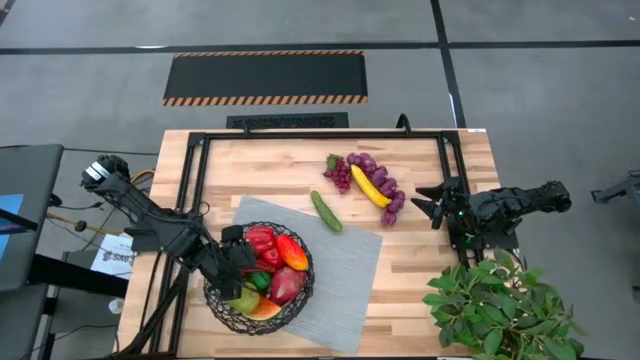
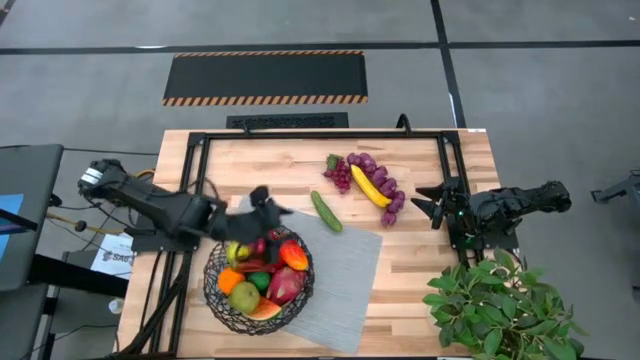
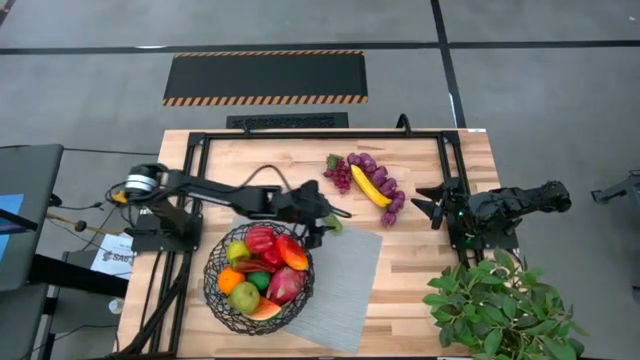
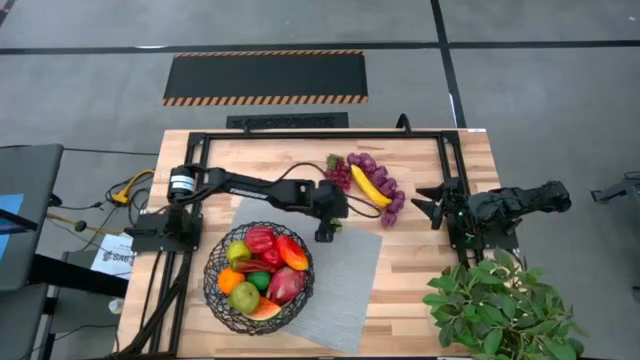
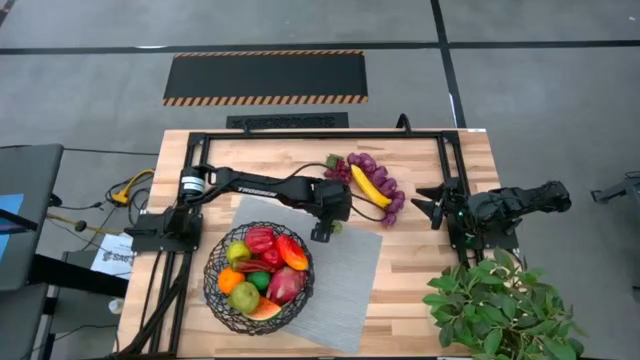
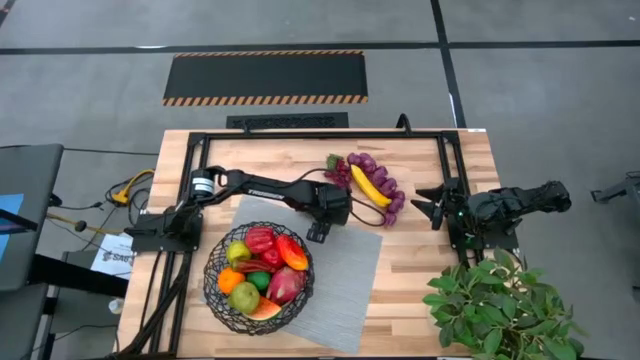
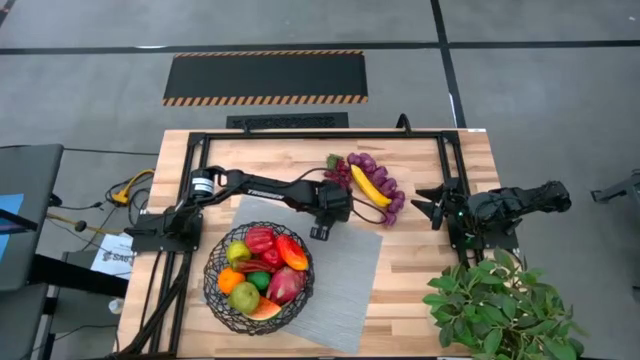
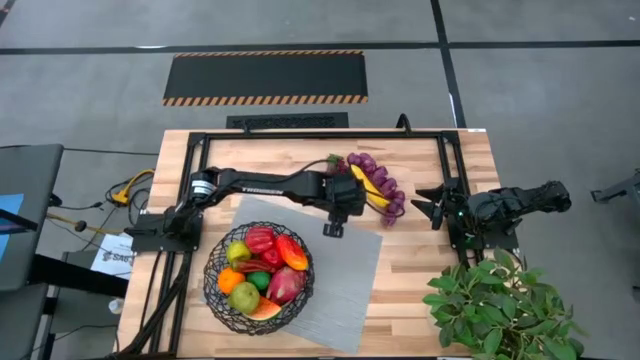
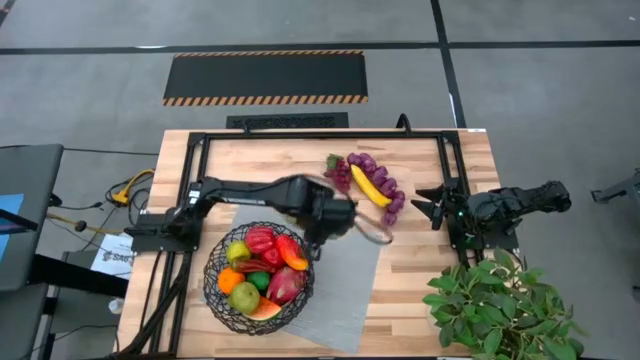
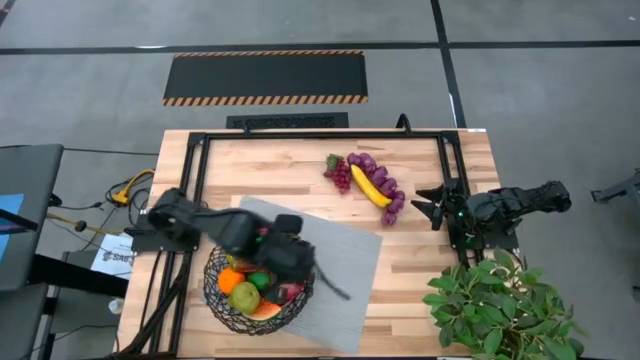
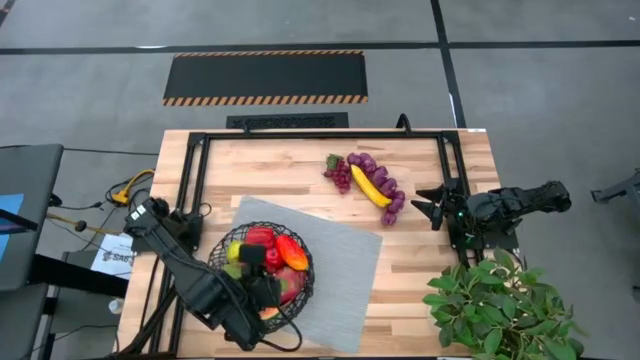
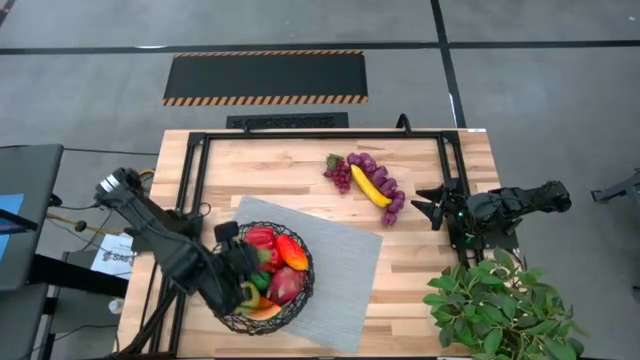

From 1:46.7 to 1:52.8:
Task: Build produce basket
Put the green cucumber into the mesh basket

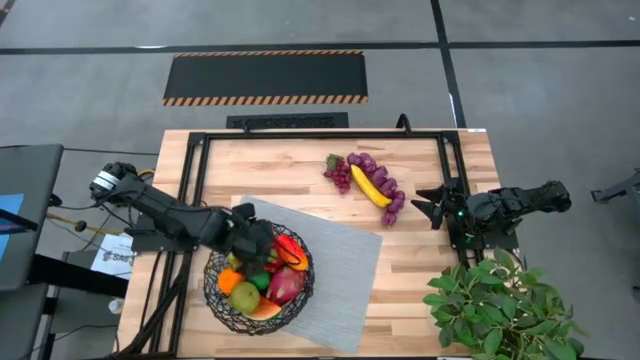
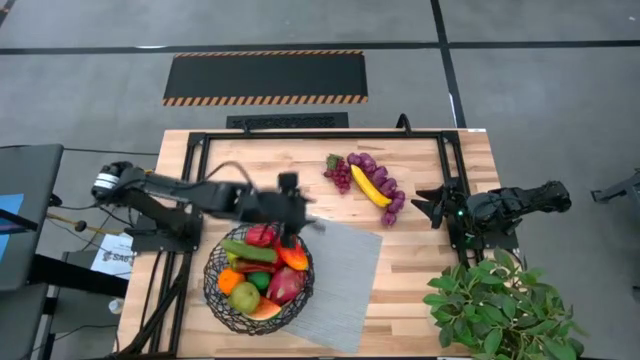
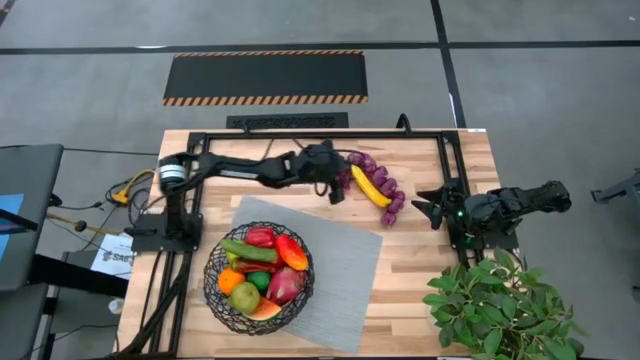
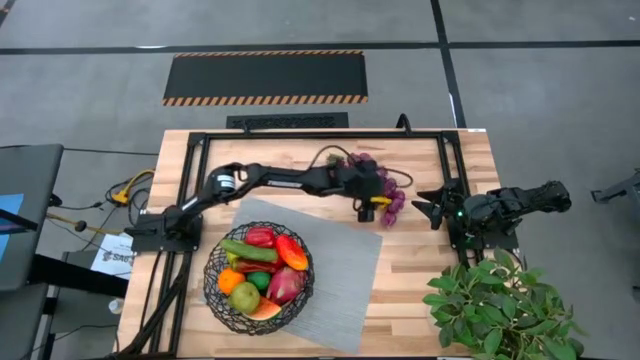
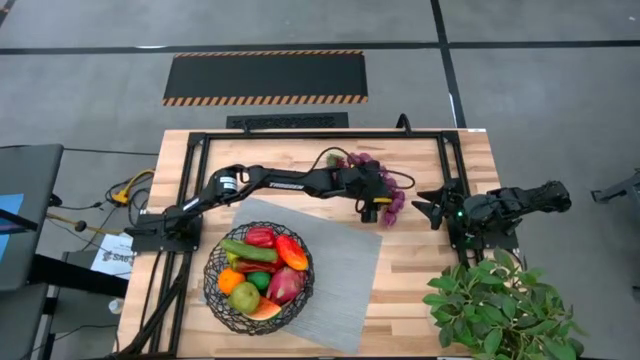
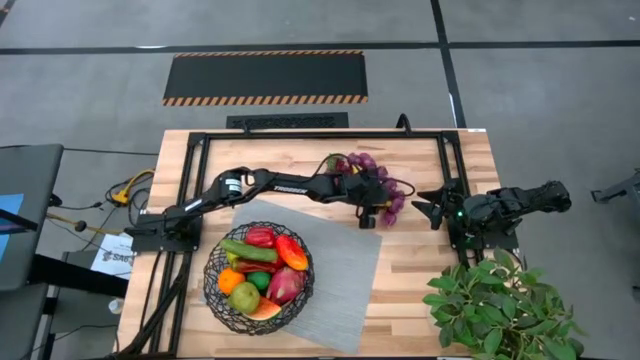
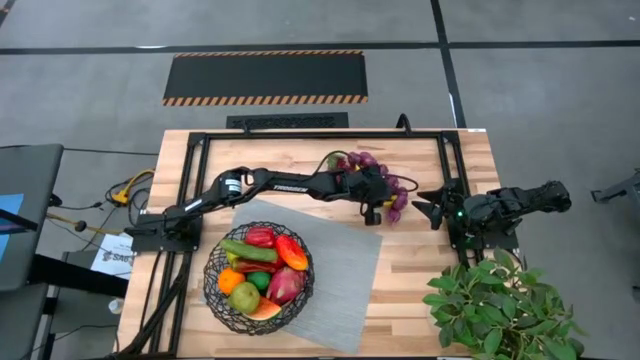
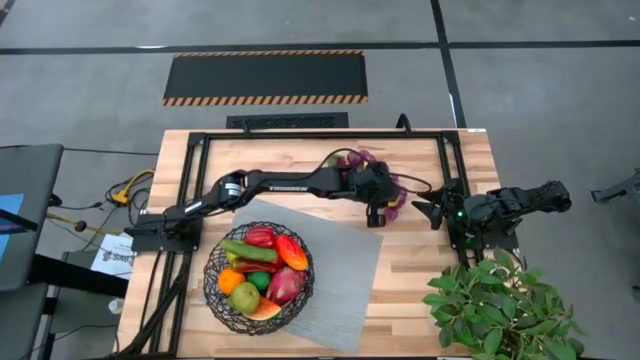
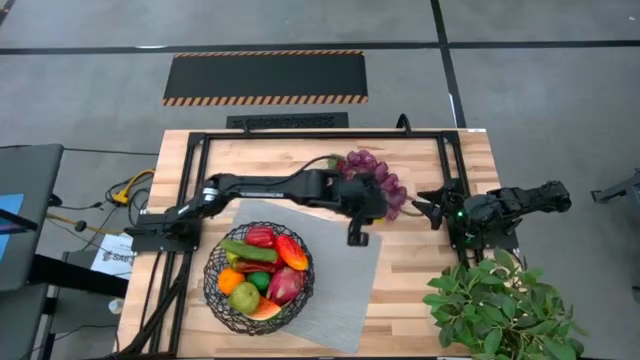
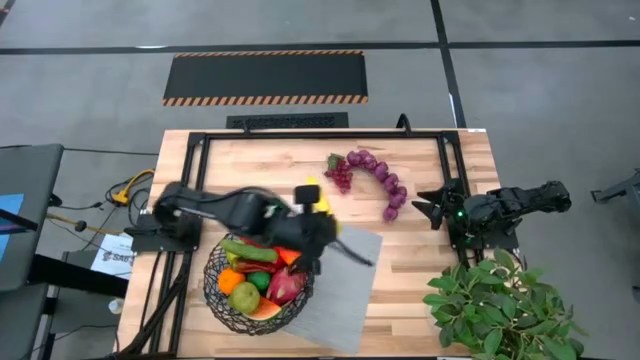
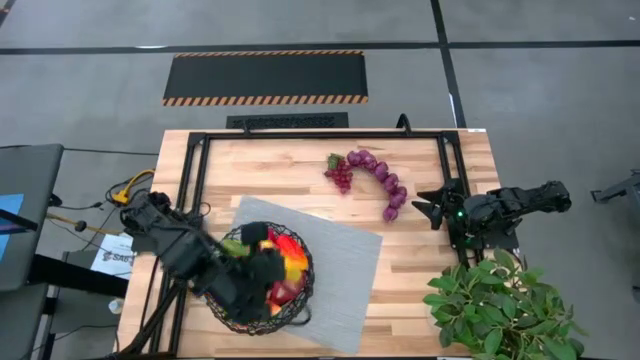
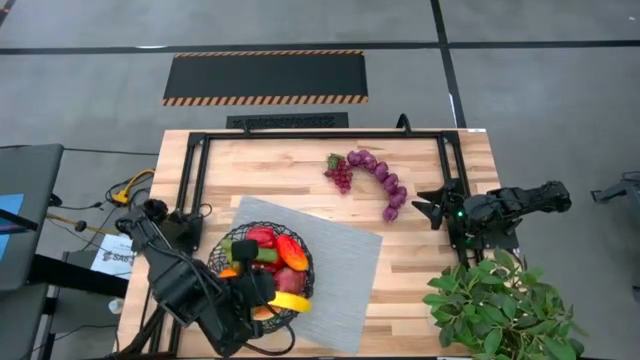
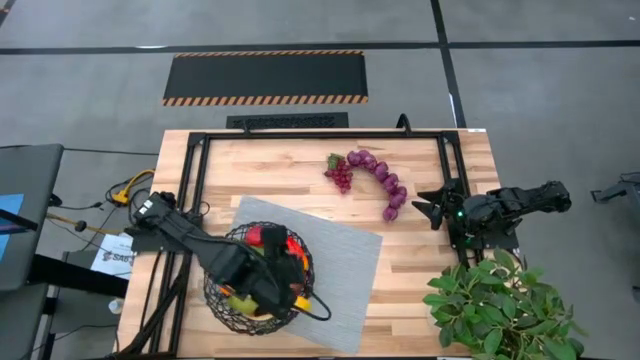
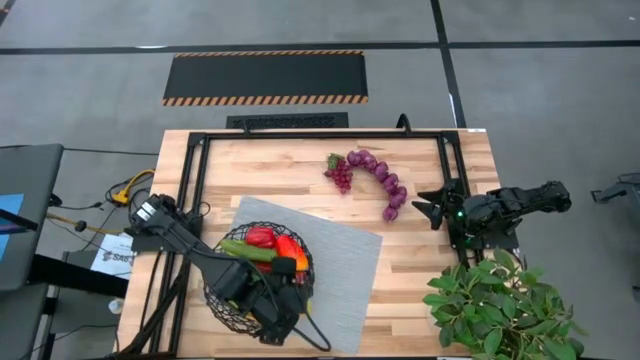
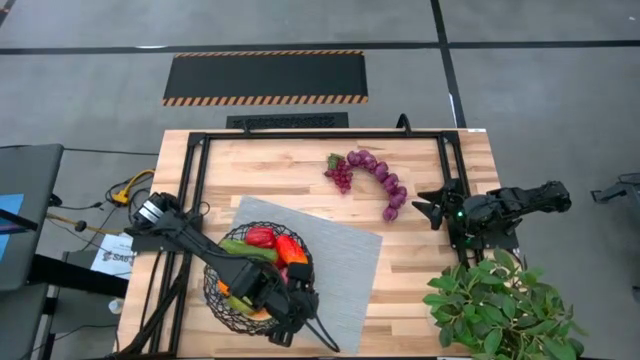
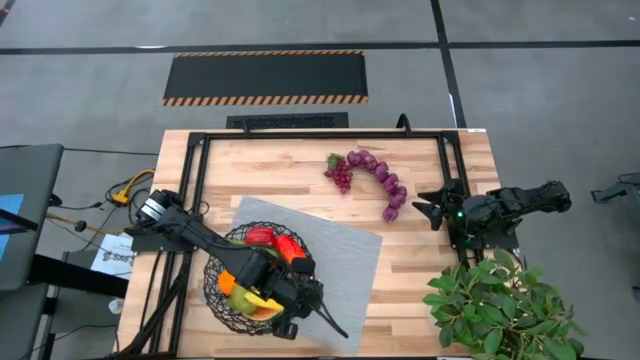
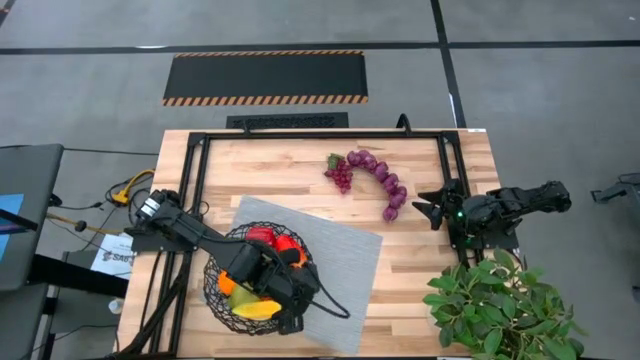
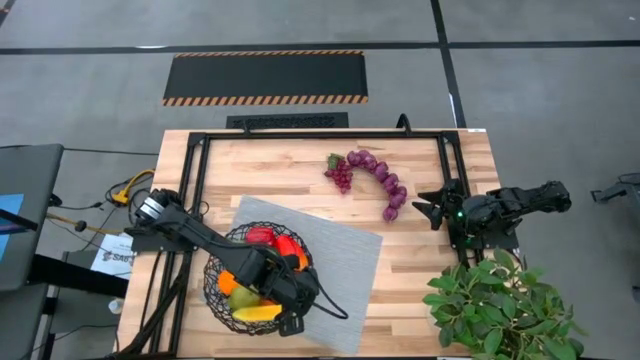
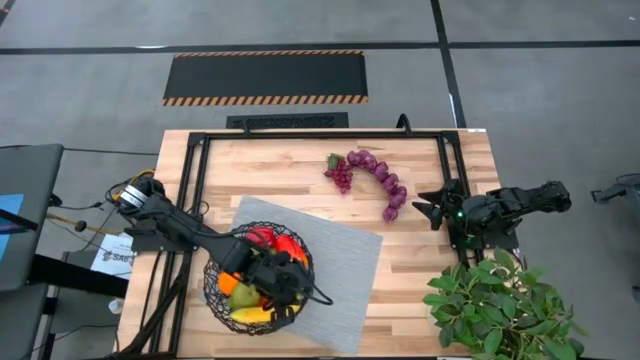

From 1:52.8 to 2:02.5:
Put the yellow banana into the mesh basket

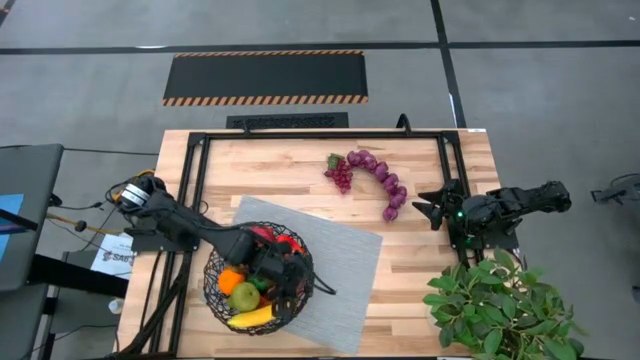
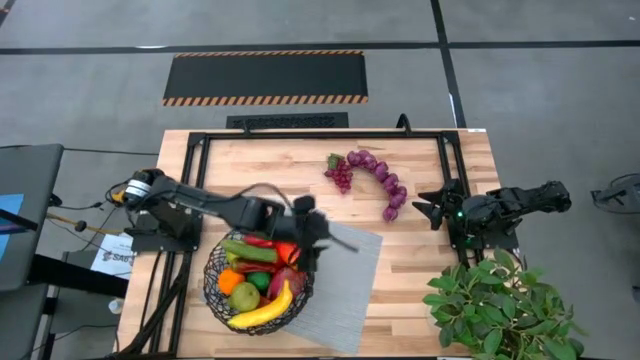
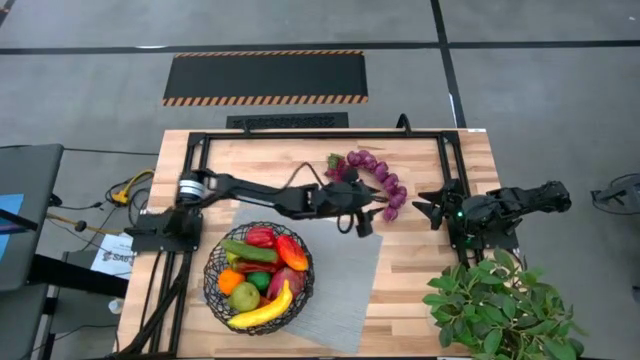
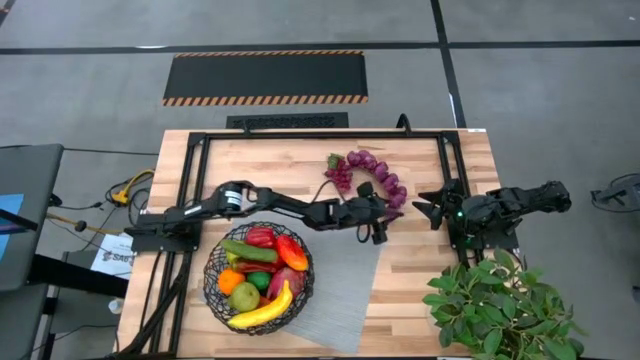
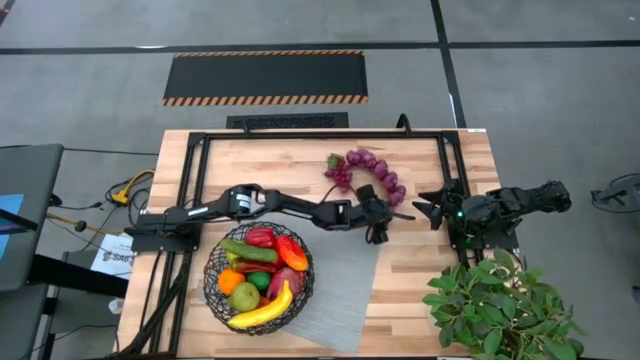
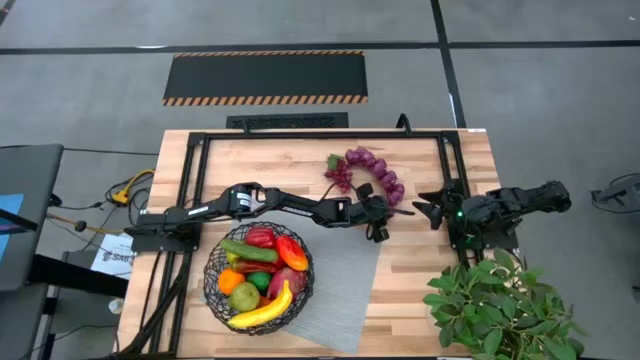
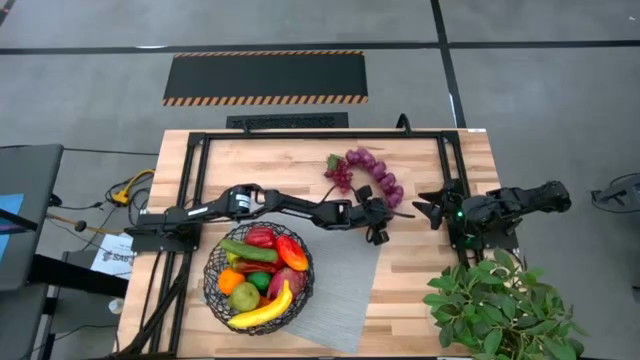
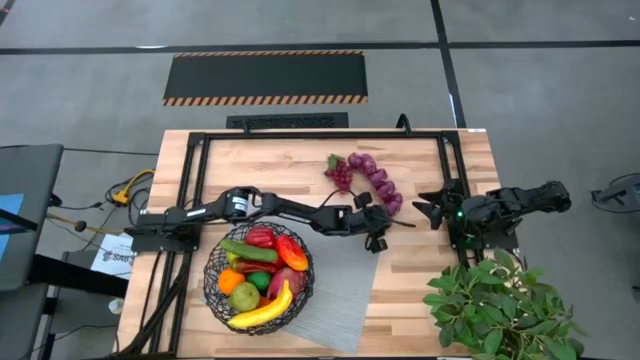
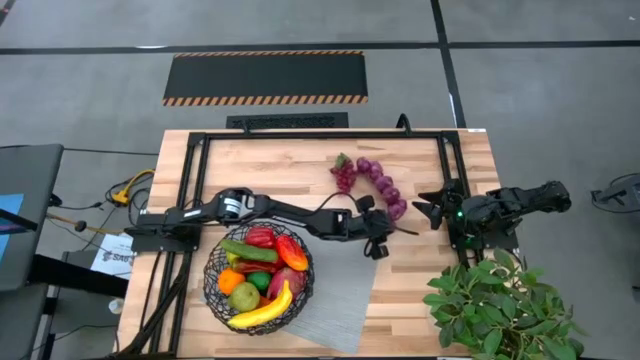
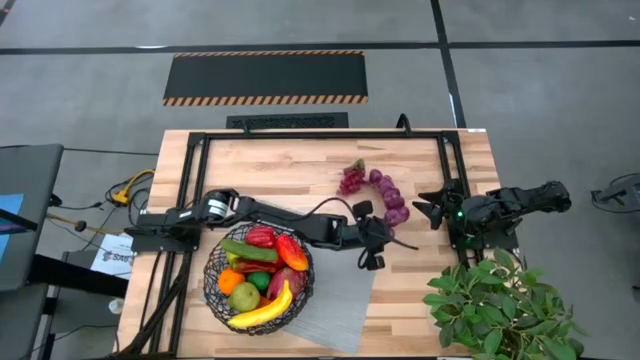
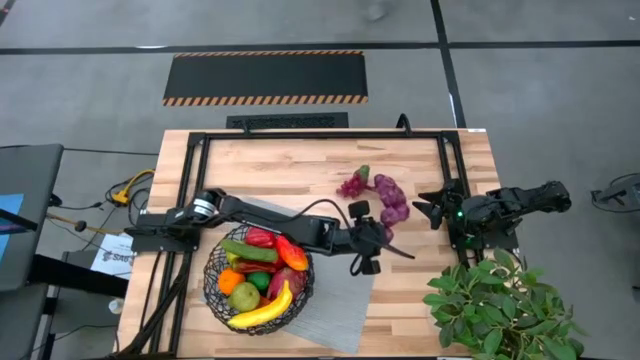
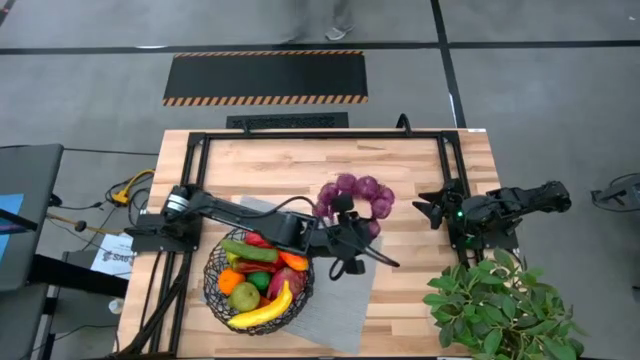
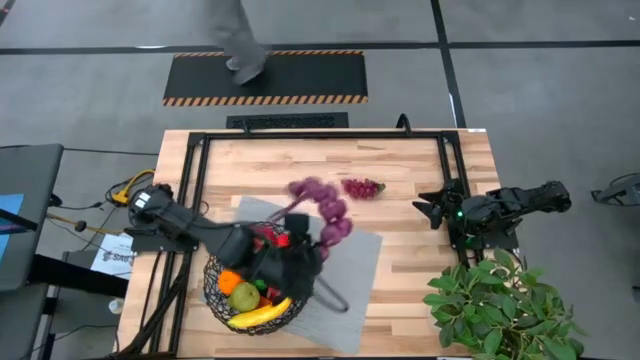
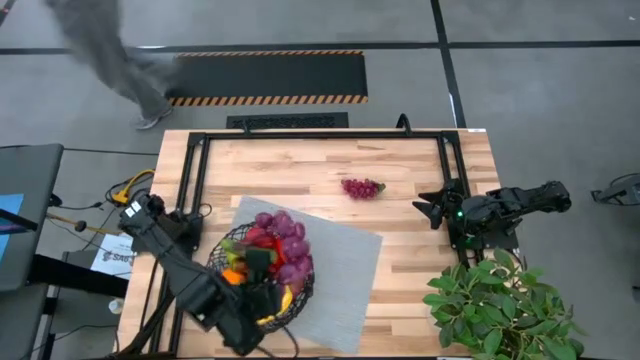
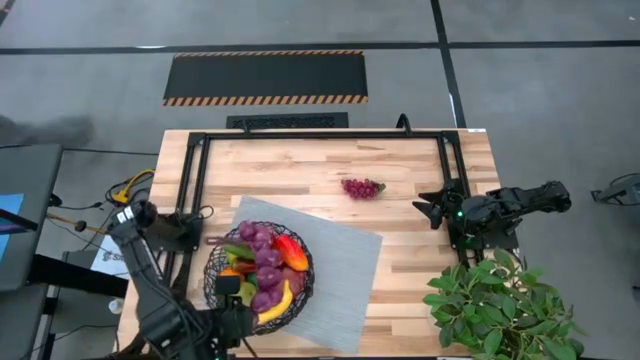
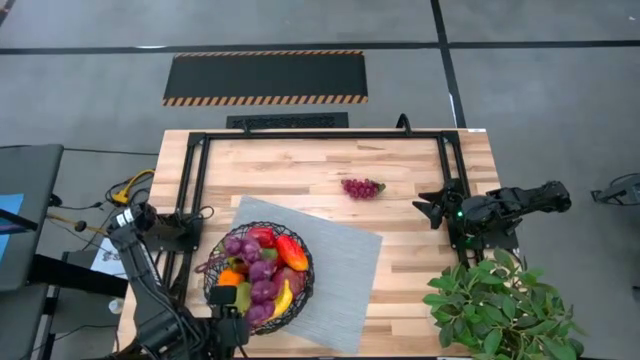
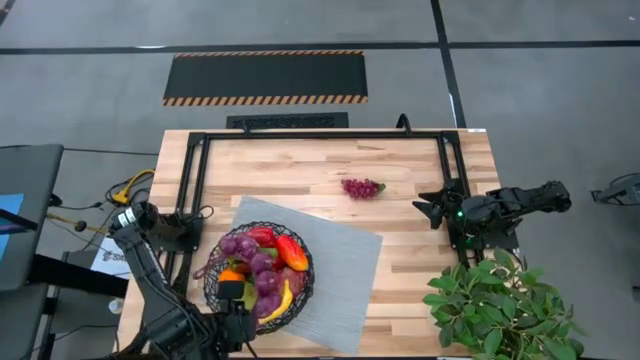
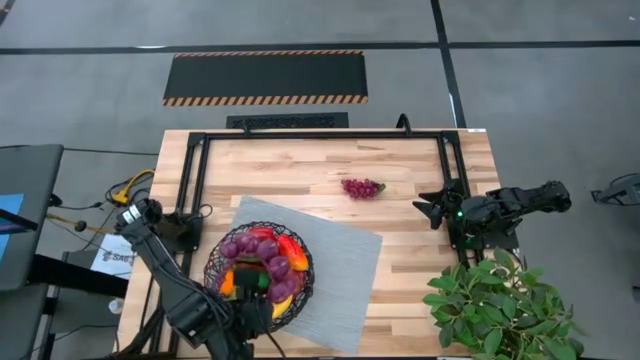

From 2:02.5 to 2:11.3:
Put the purple garlic into the mesh basket
